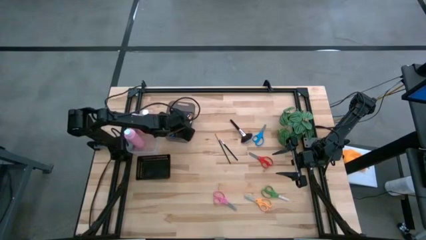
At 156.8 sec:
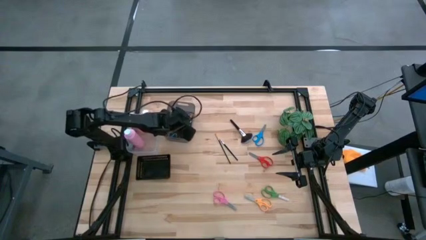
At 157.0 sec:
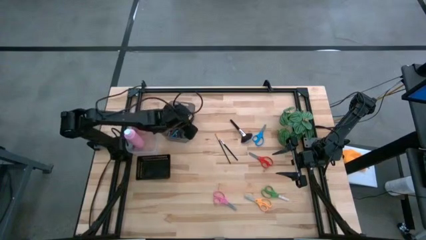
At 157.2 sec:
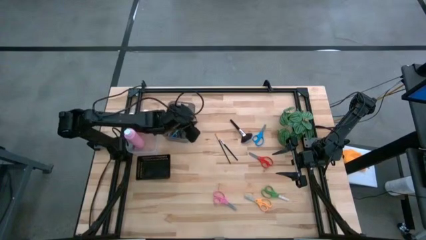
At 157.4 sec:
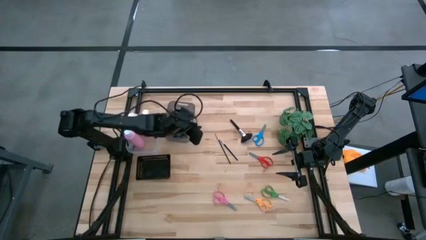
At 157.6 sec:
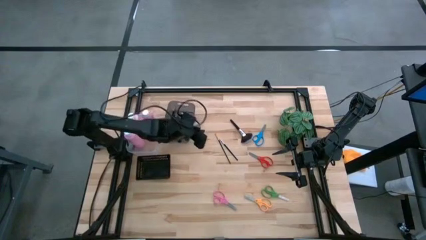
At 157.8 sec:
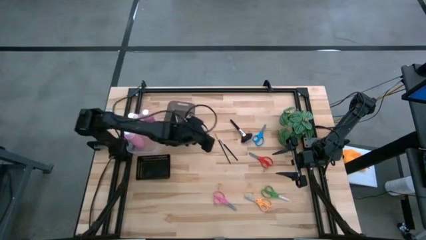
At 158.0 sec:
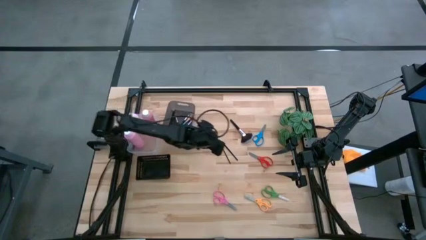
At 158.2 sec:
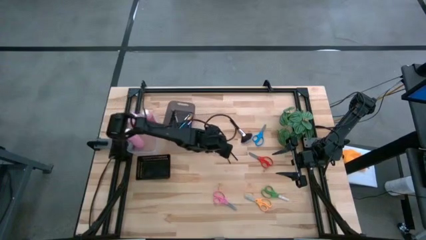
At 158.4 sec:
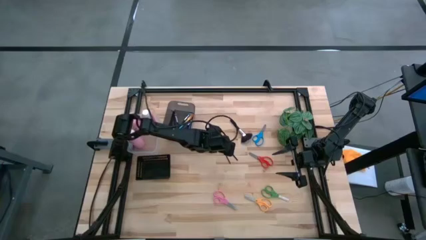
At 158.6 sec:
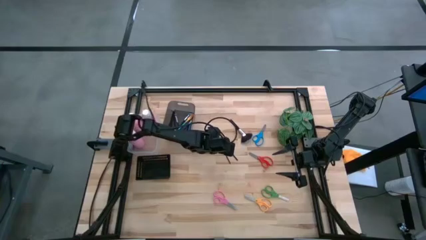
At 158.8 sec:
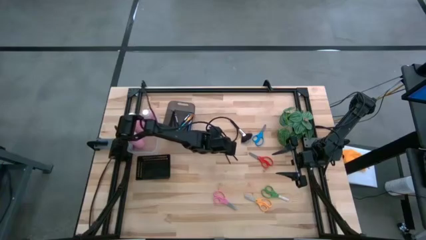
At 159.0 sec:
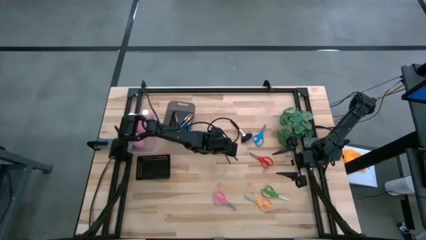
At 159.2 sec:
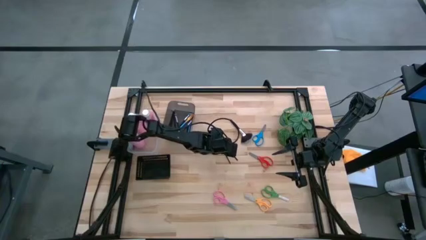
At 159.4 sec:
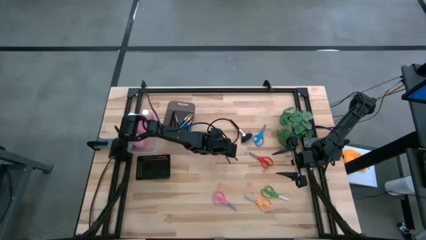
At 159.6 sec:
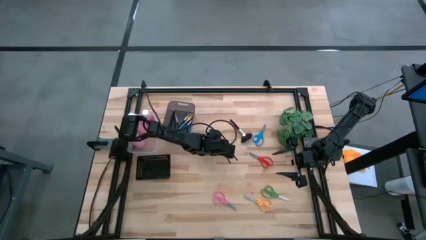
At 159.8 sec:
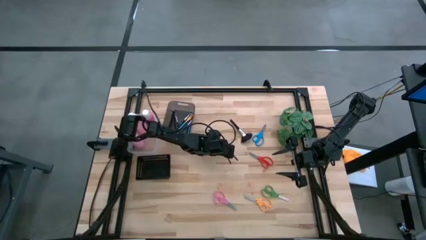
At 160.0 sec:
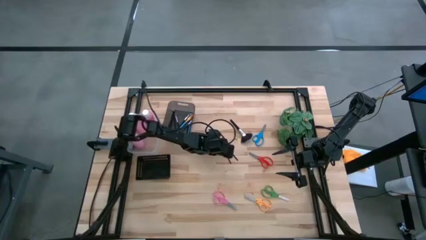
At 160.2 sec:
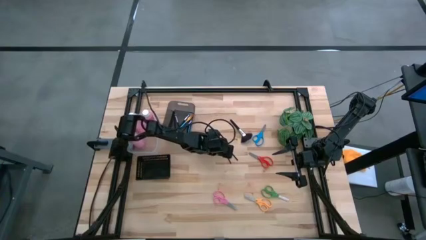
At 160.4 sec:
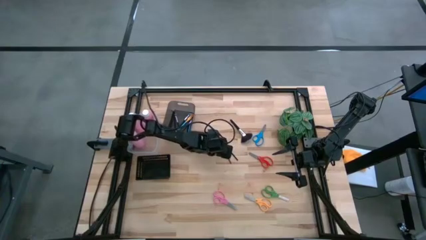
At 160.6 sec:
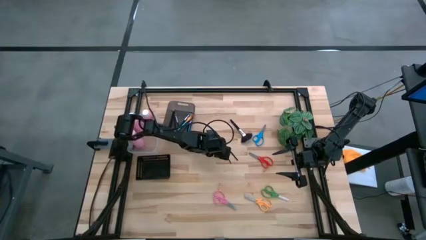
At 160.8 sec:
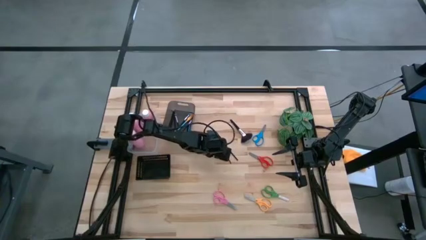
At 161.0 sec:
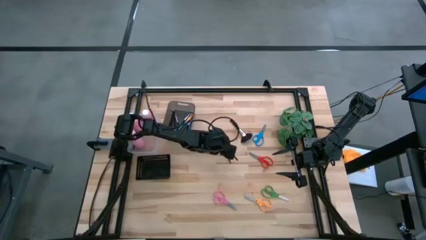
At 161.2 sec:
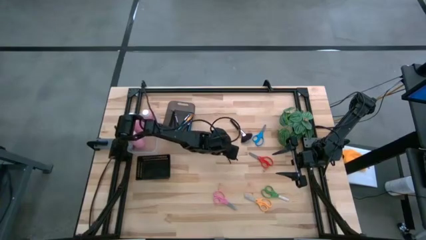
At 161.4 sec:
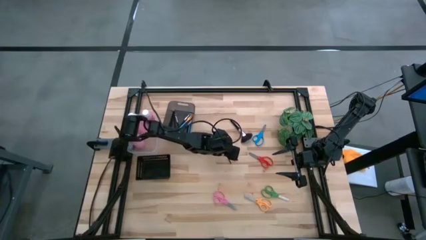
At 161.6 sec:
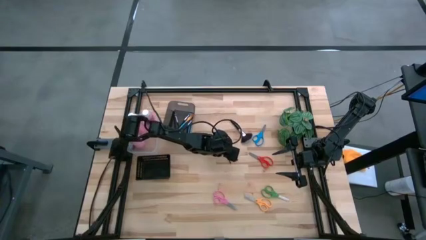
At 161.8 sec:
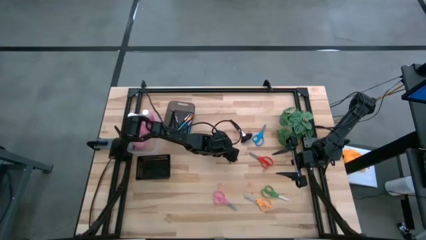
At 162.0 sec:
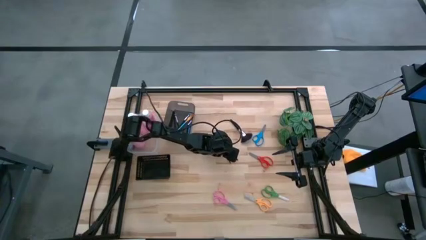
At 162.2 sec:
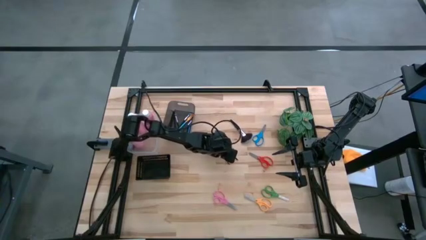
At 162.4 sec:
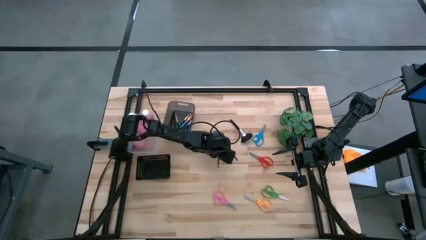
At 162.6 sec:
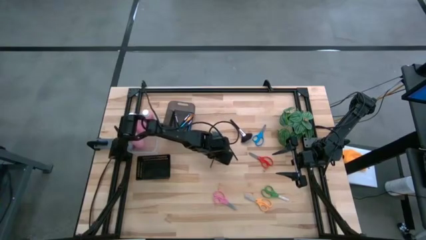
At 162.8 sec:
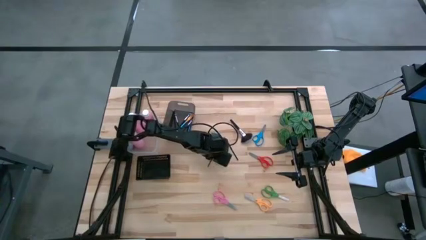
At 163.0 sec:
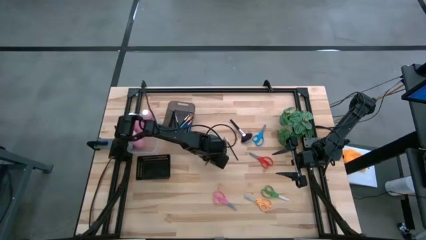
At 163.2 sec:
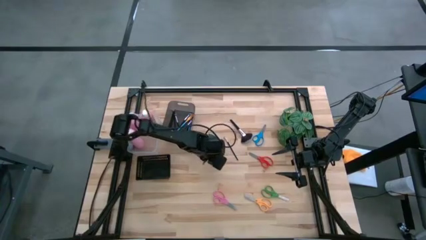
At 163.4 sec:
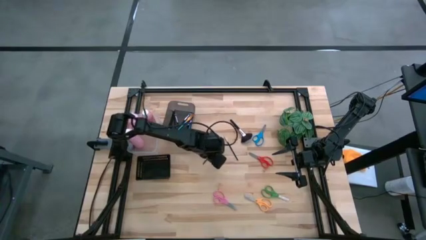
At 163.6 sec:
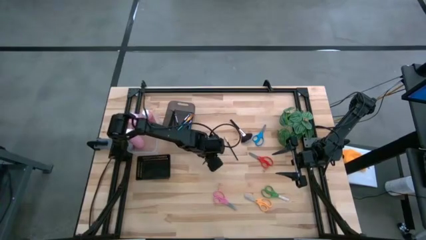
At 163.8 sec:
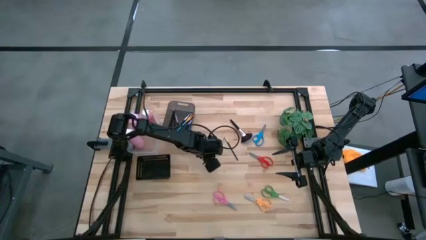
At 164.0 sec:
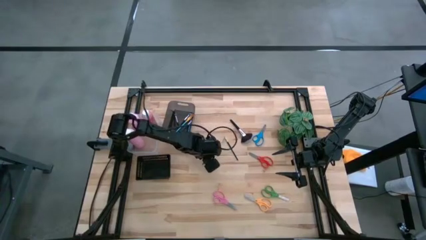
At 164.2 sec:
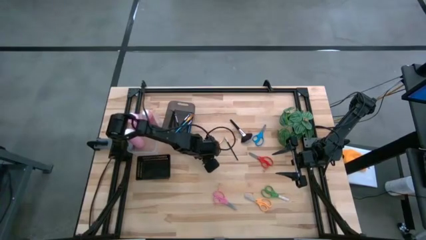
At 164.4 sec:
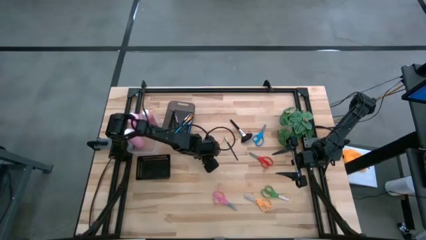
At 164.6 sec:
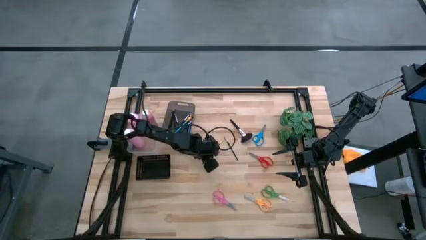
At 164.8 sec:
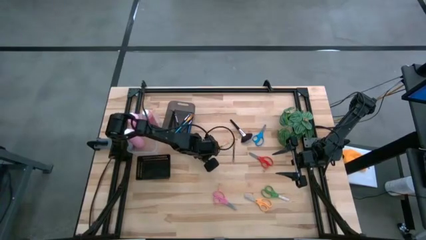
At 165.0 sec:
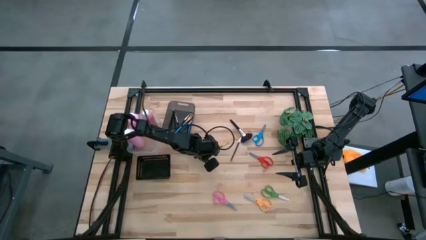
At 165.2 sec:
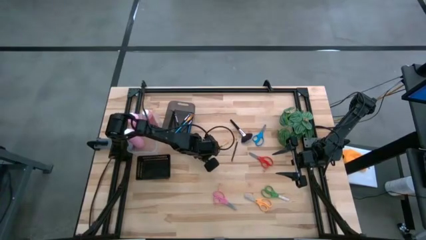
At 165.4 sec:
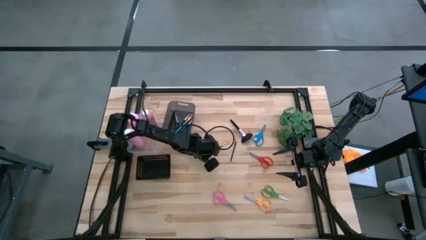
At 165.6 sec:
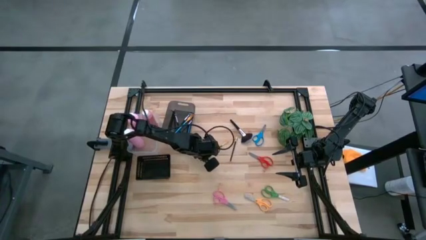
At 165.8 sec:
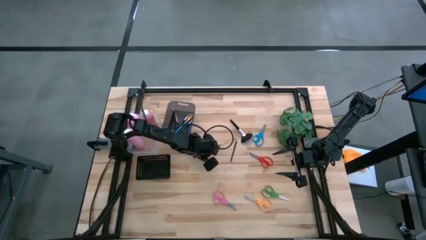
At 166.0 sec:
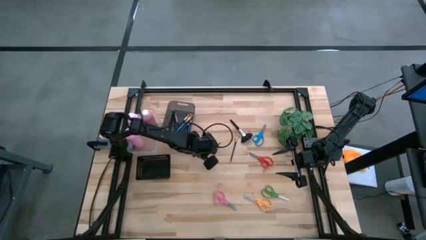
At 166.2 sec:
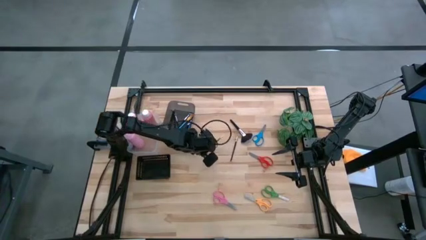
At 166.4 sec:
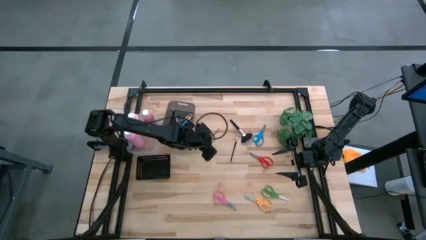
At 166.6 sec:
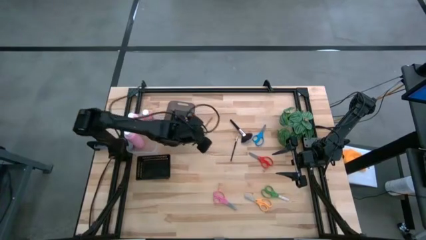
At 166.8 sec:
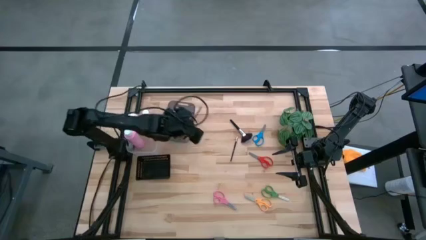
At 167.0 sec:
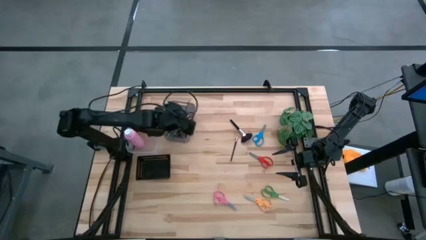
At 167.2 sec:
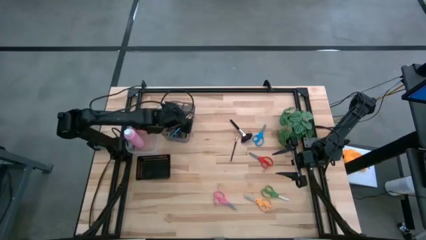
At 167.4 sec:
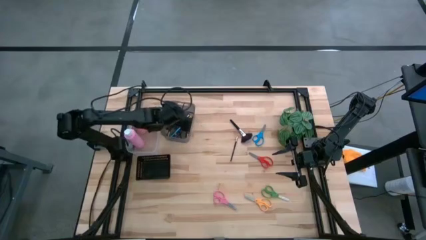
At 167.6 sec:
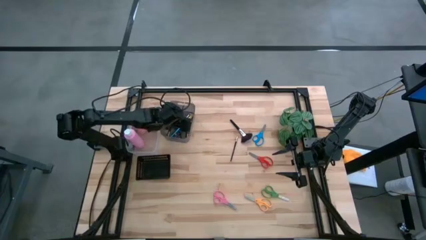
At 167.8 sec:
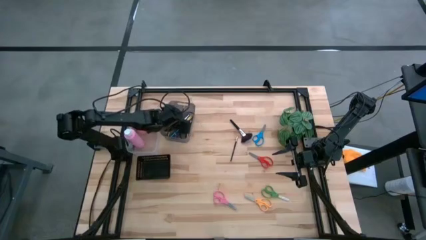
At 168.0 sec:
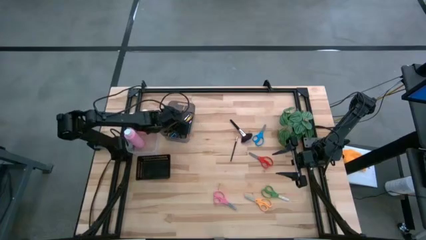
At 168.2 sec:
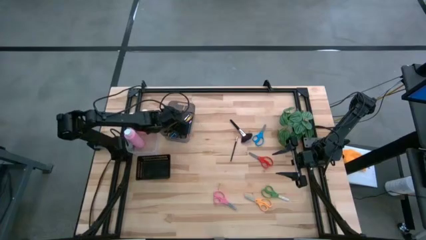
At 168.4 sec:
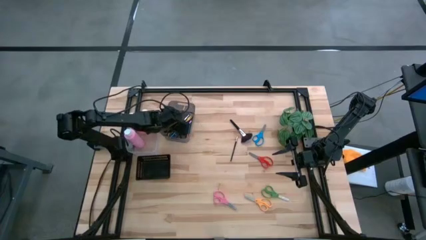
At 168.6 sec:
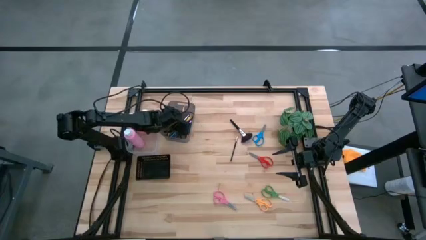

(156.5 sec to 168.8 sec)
Task: Pick & Place Paint Supplies
Put the middle gold brush into the black bin
